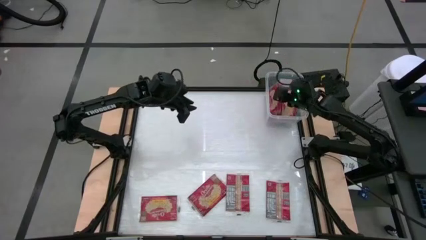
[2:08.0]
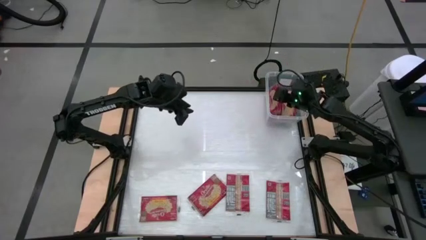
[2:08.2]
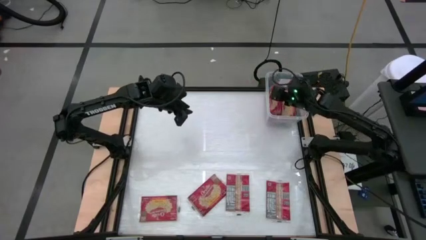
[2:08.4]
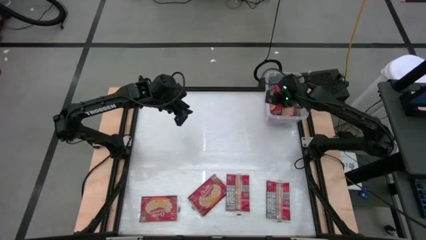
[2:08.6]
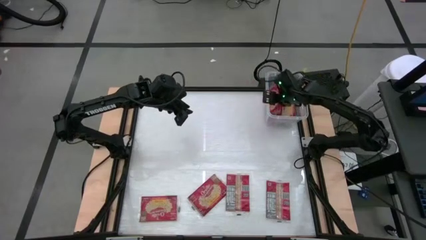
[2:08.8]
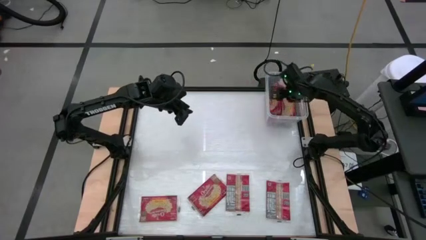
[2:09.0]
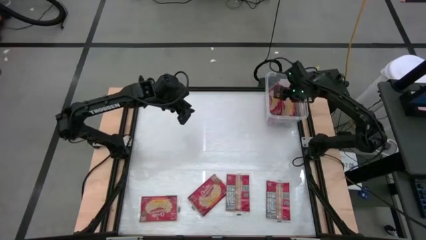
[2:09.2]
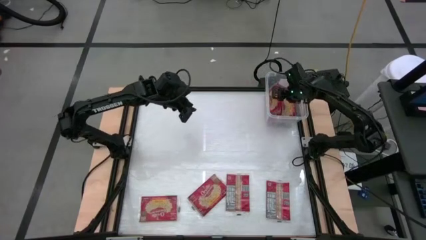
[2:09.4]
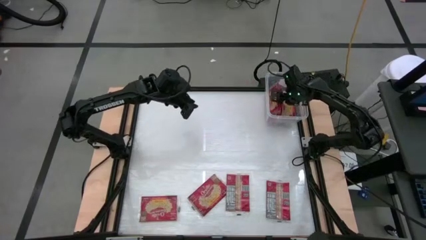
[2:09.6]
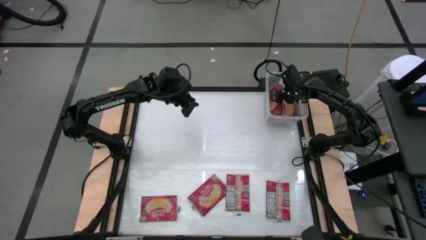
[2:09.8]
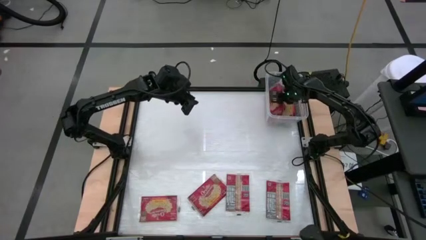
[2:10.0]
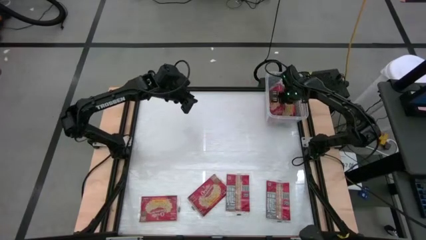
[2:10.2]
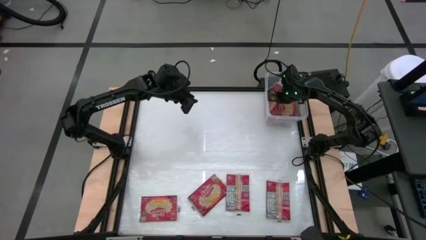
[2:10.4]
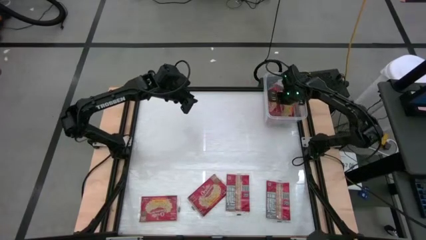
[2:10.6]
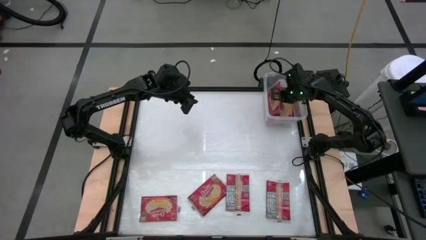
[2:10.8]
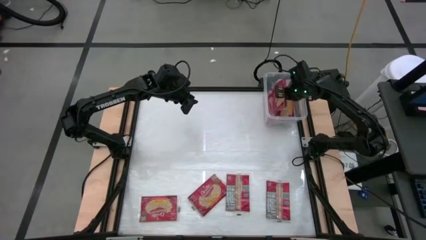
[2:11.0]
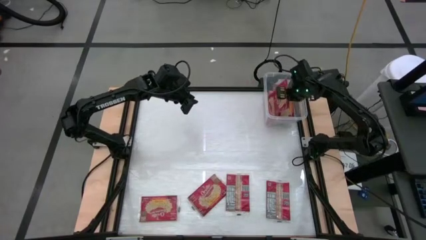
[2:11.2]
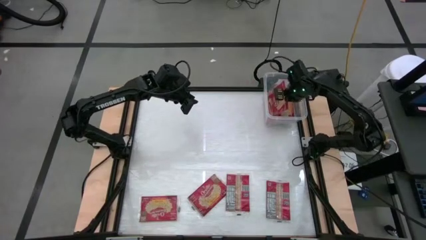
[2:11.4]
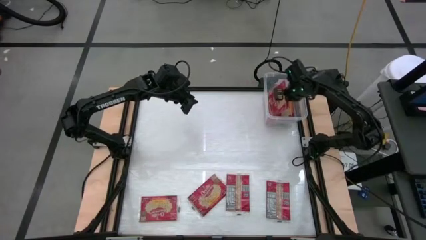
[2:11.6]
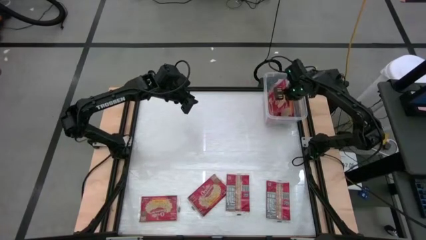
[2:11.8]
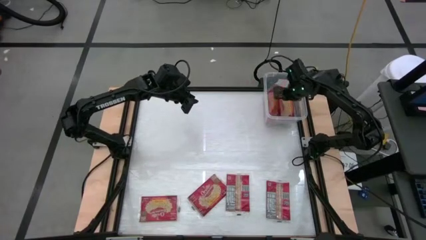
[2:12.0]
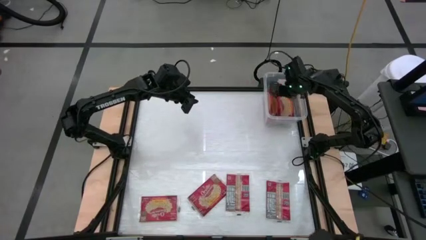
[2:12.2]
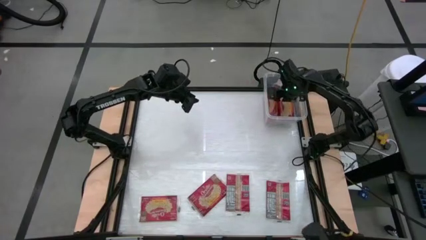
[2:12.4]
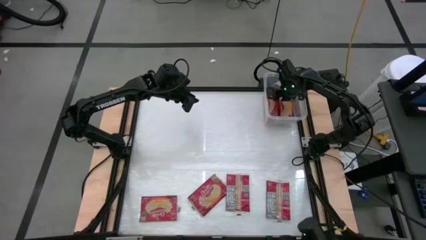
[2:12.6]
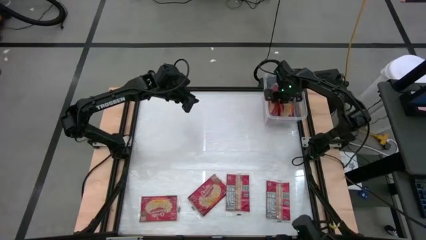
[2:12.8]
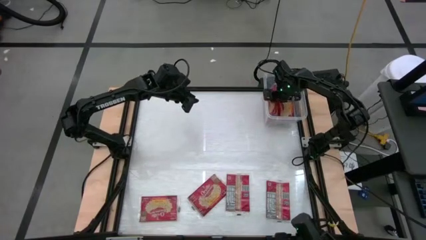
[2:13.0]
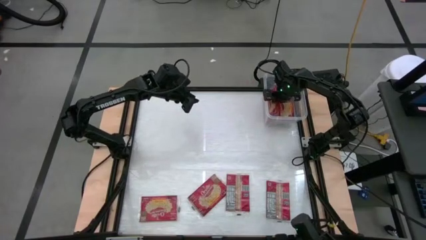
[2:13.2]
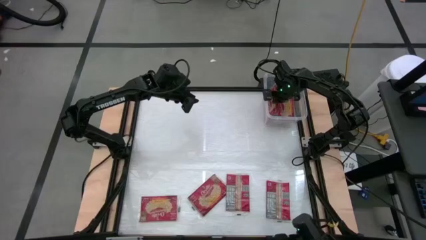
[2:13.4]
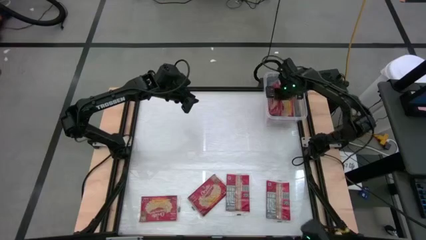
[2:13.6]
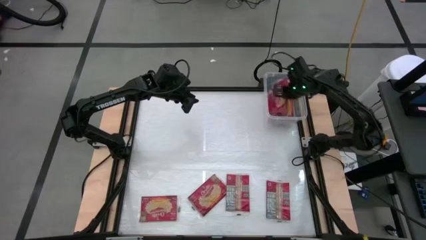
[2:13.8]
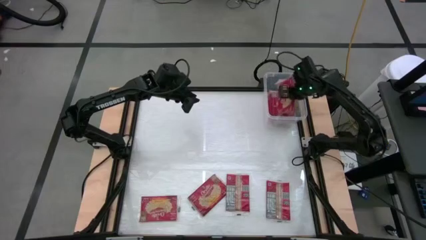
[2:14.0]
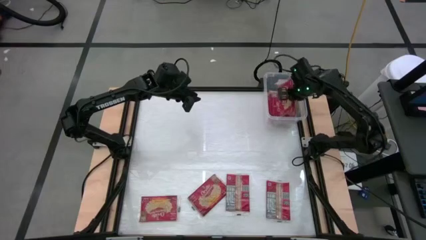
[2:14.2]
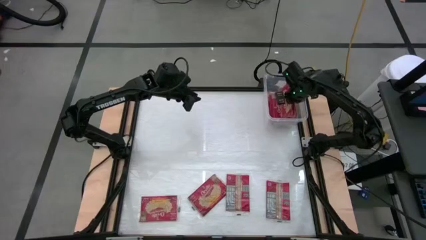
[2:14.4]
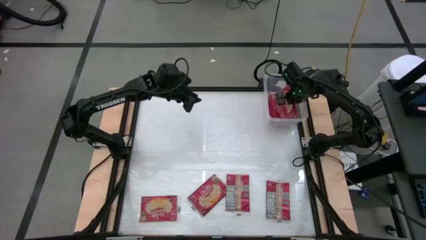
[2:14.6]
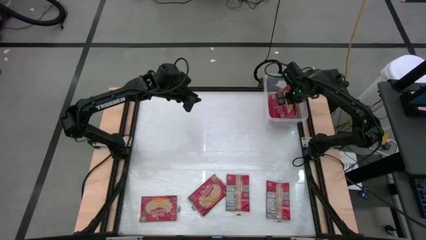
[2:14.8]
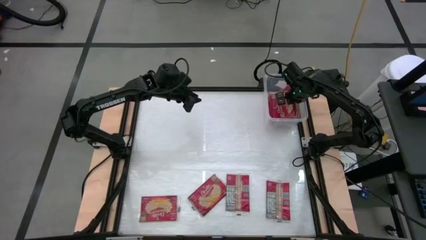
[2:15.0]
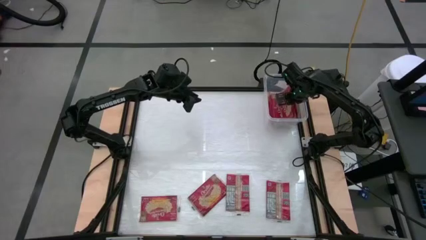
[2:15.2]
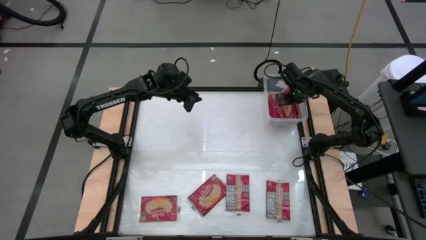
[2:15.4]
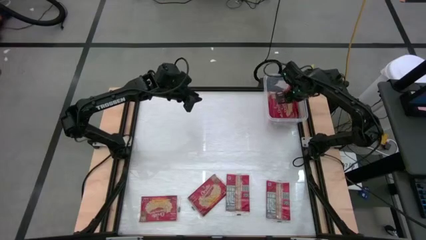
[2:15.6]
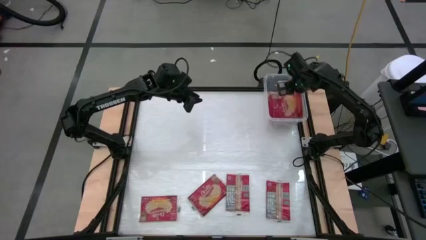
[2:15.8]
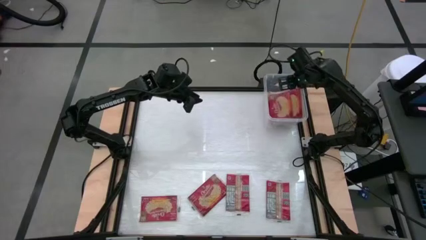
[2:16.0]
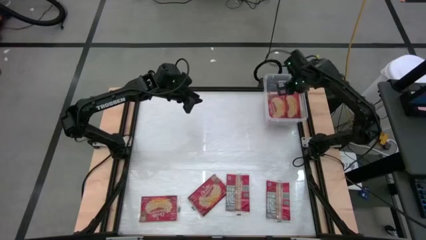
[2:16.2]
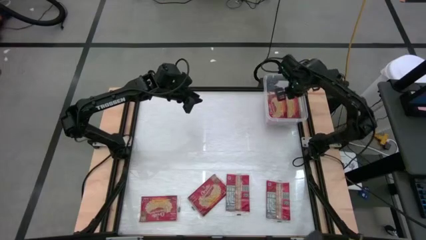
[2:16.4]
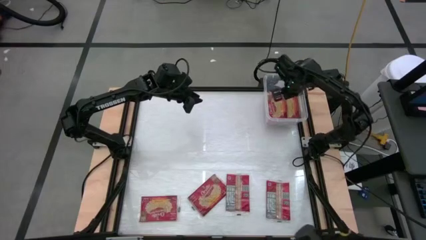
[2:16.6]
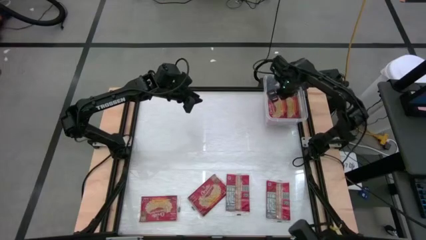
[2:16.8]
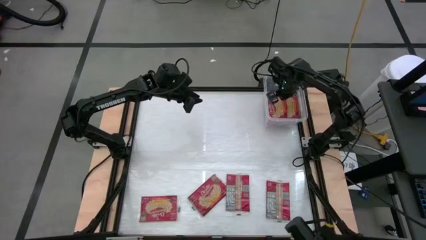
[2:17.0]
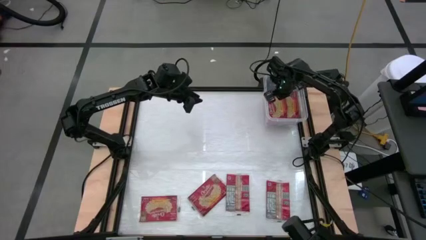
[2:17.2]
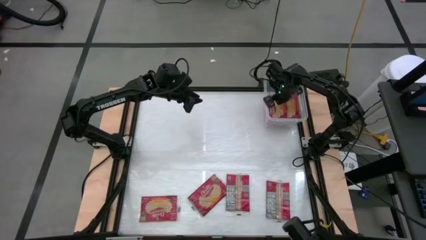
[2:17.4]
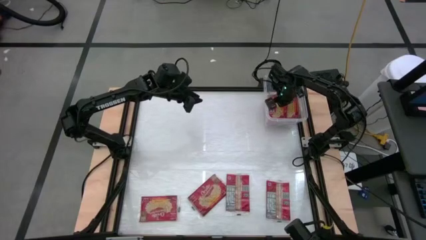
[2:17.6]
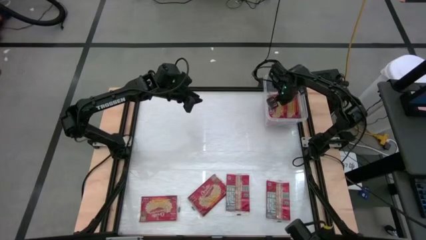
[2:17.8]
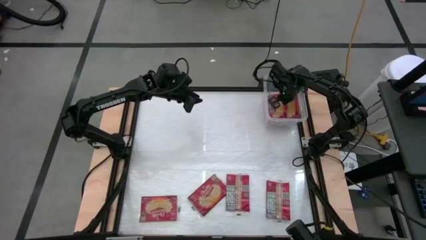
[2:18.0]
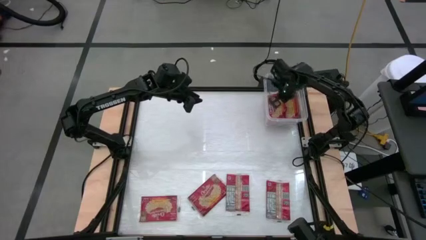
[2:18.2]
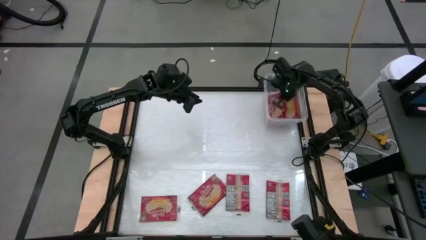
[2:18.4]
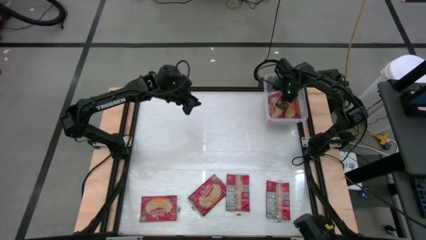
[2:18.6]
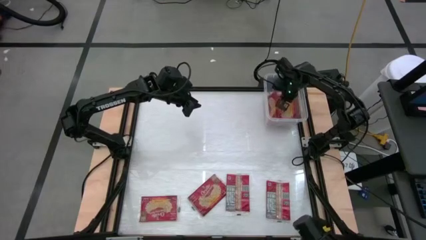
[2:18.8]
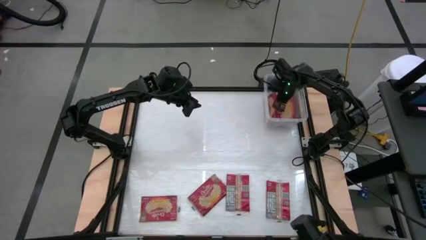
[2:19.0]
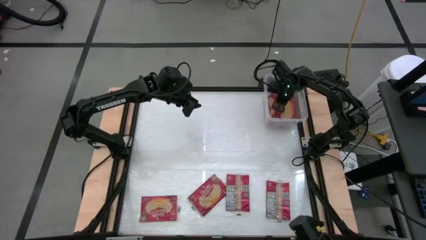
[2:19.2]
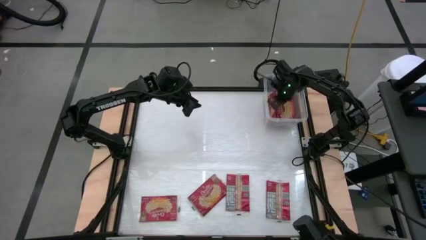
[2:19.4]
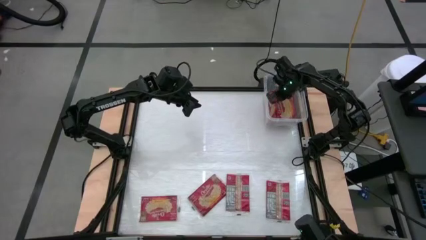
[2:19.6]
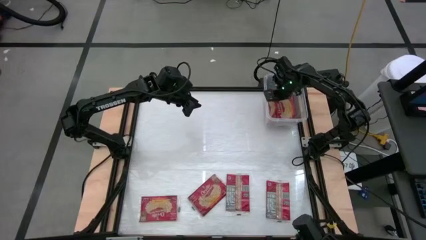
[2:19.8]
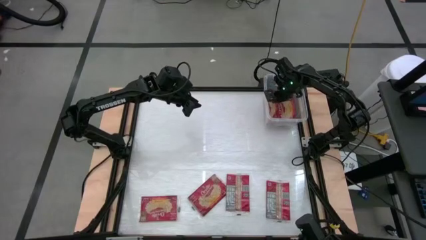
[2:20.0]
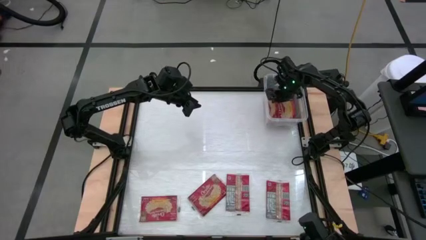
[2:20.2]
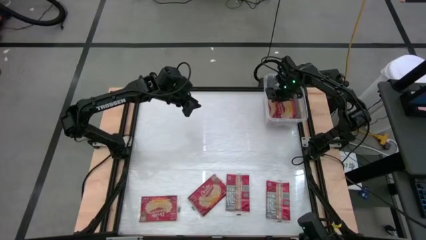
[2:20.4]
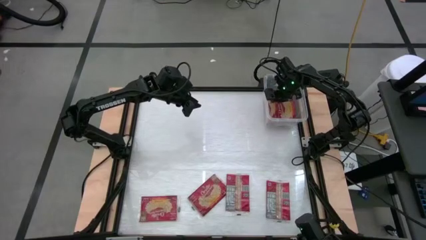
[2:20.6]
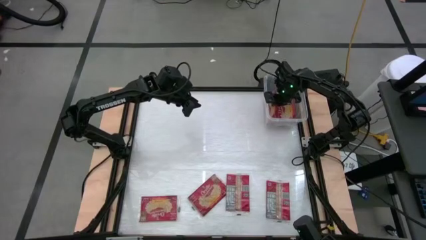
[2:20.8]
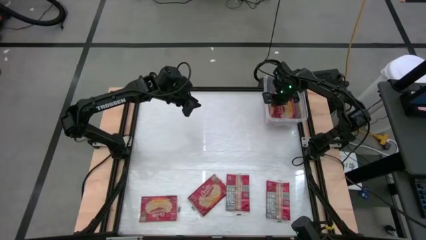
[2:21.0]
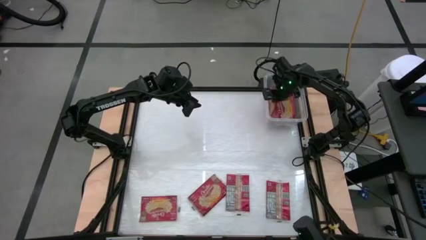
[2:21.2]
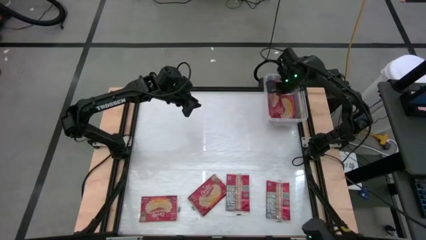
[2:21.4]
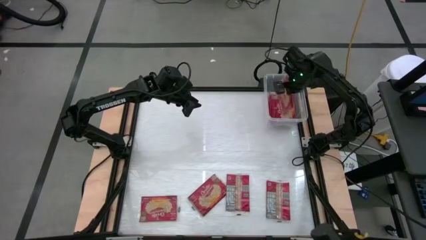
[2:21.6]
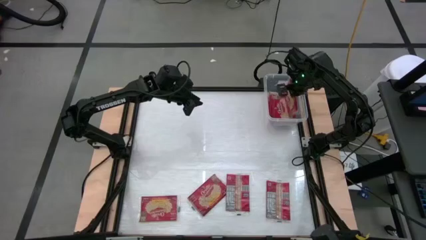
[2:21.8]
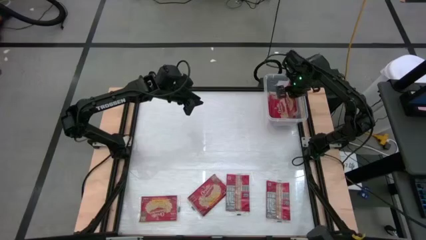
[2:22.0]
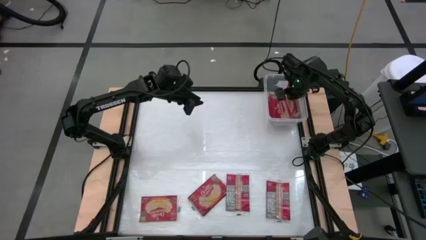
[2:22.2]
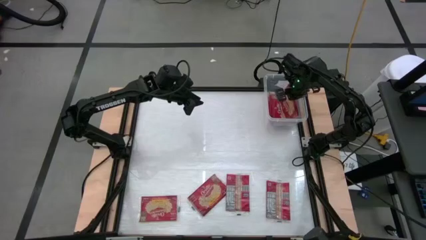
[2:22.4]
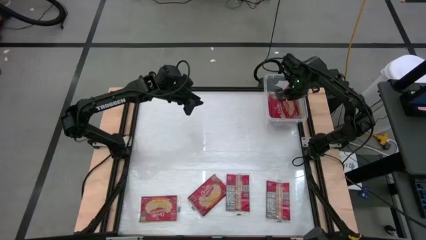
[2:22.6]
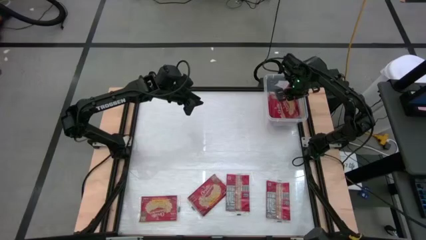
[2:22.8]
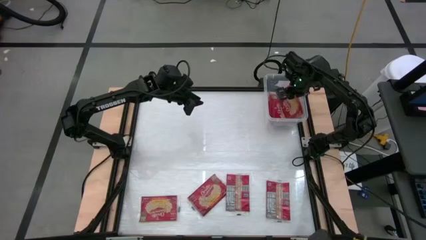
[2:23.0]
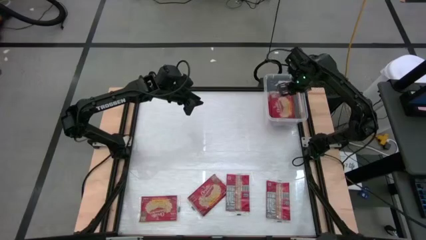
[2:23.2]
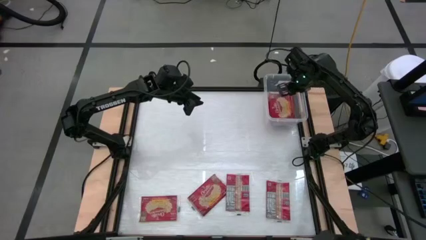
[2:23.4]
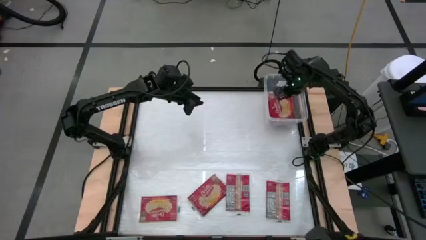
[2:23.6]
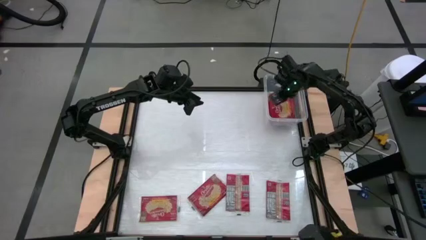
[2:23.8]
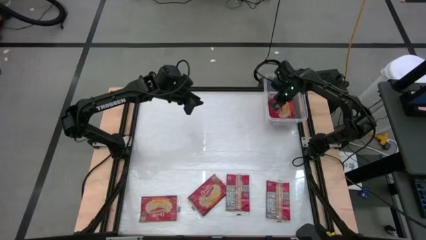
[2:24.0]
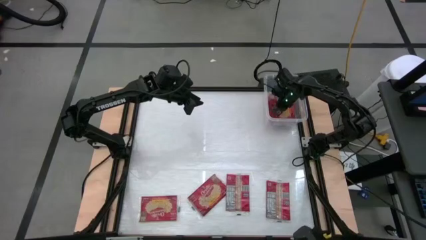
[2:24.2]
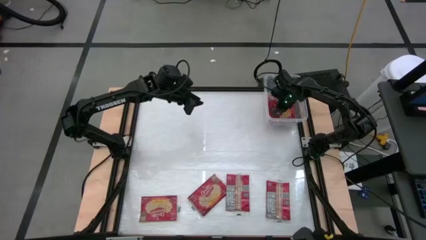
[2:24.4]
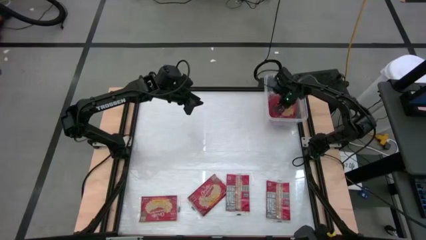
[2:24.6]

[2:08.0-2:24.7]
Task: Sort popcorn bags into baskets
Adjust the red popcorn bag in the transparent container
